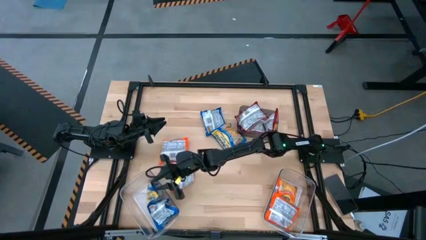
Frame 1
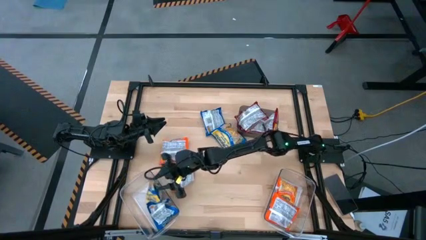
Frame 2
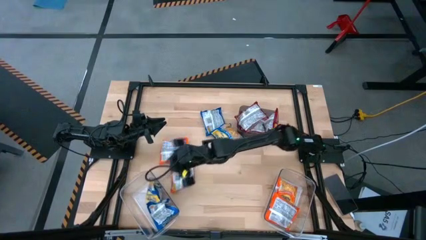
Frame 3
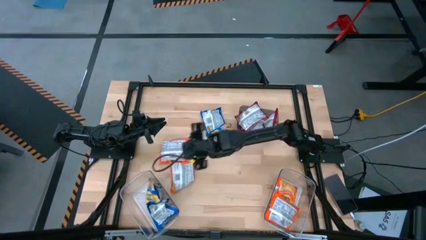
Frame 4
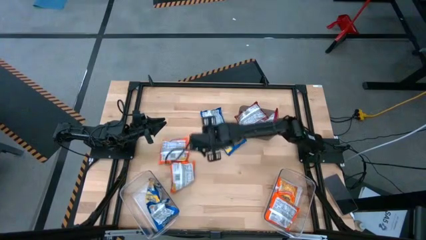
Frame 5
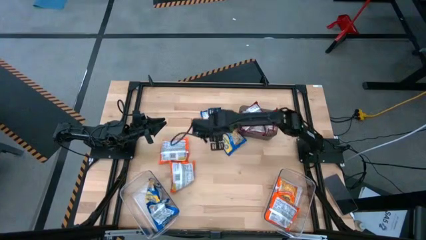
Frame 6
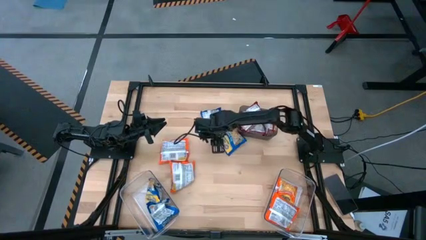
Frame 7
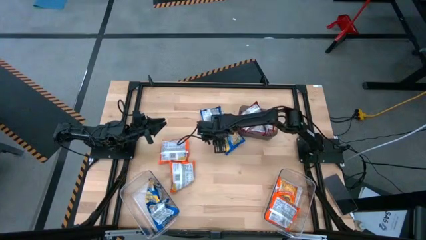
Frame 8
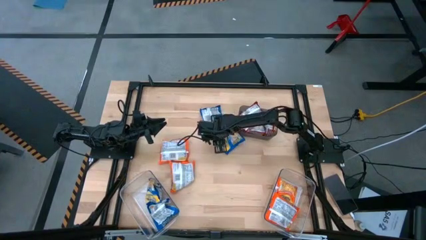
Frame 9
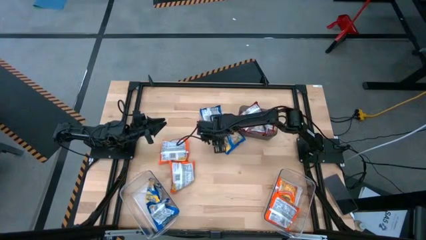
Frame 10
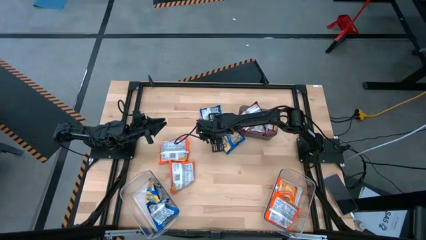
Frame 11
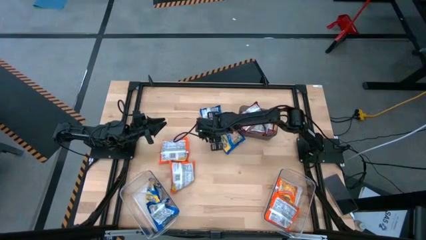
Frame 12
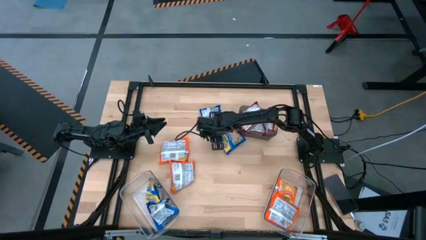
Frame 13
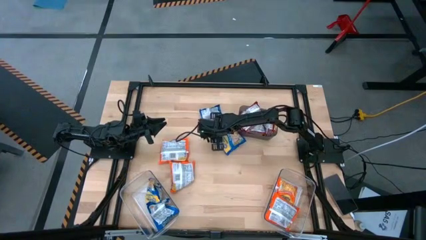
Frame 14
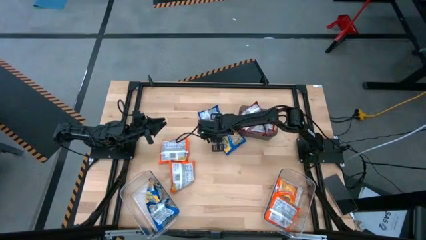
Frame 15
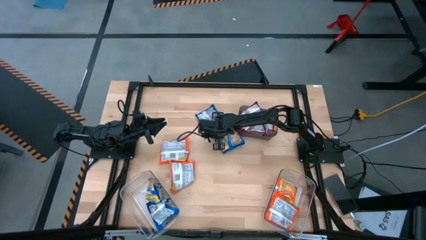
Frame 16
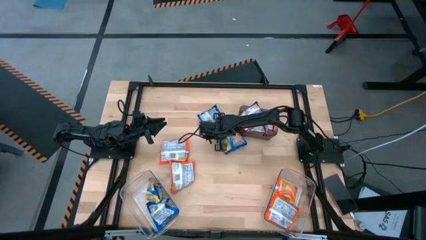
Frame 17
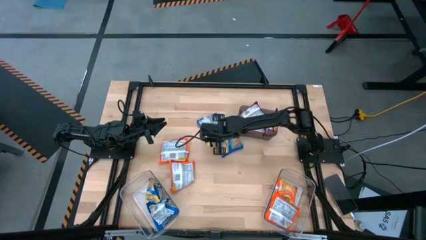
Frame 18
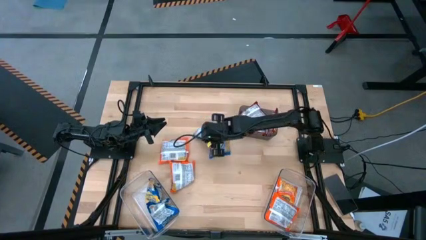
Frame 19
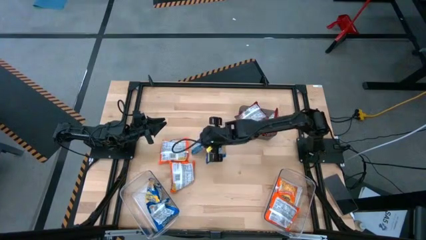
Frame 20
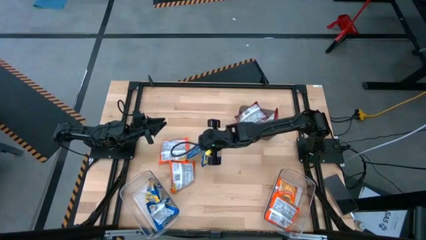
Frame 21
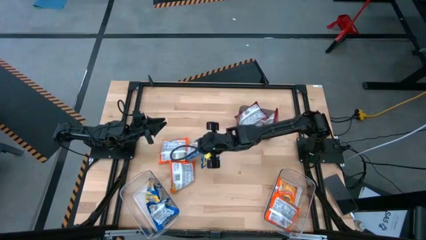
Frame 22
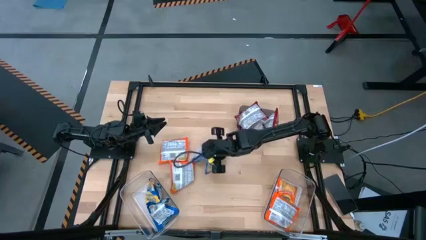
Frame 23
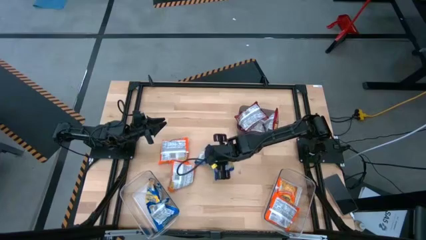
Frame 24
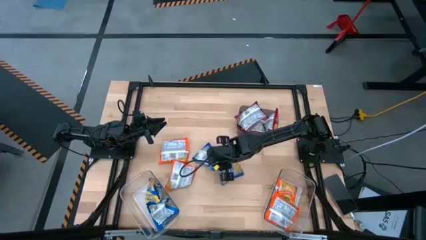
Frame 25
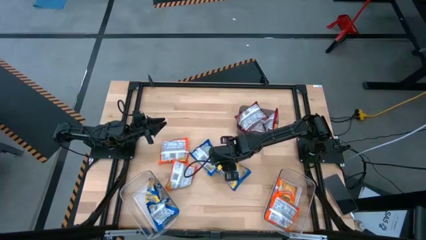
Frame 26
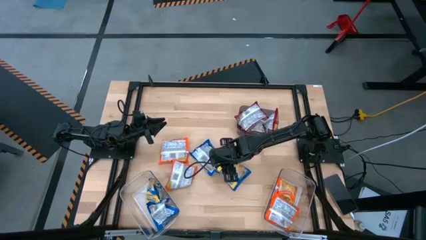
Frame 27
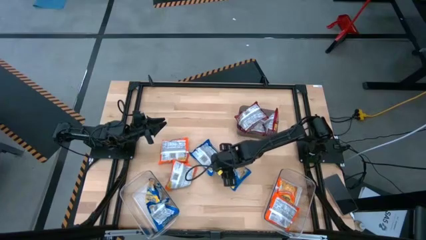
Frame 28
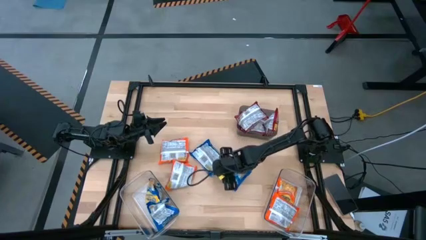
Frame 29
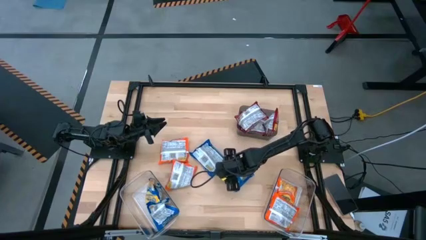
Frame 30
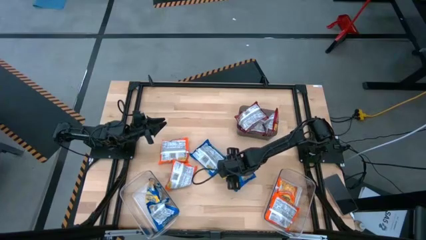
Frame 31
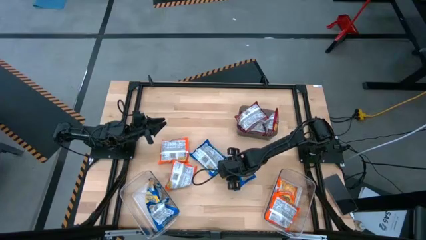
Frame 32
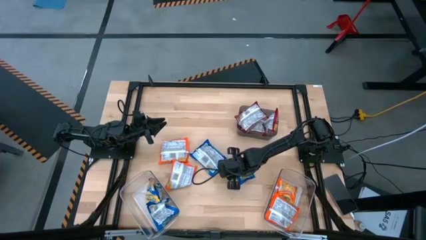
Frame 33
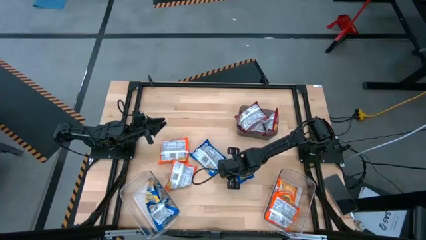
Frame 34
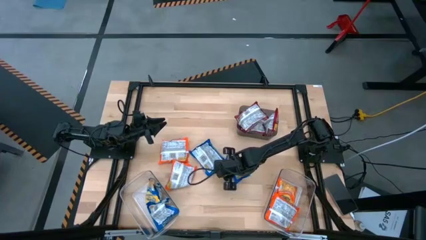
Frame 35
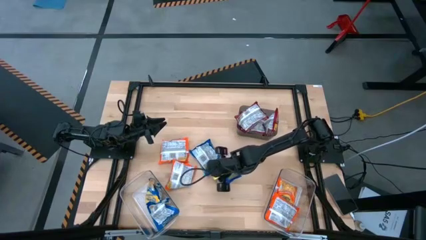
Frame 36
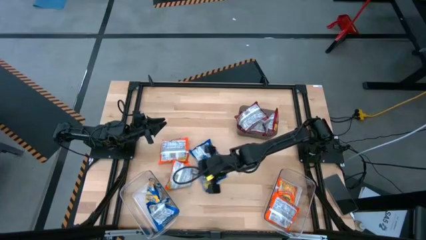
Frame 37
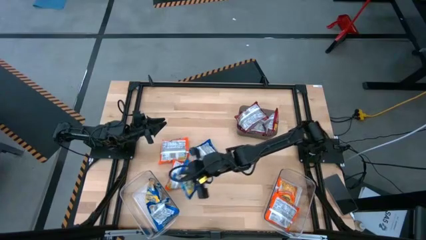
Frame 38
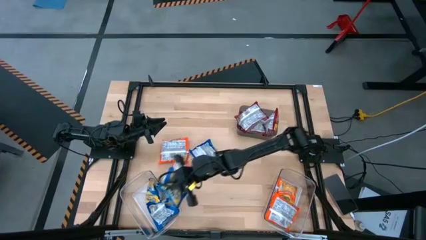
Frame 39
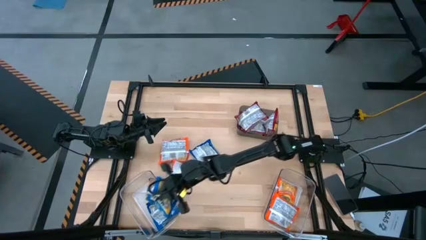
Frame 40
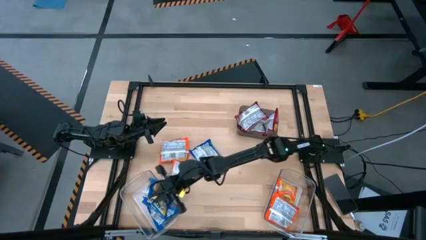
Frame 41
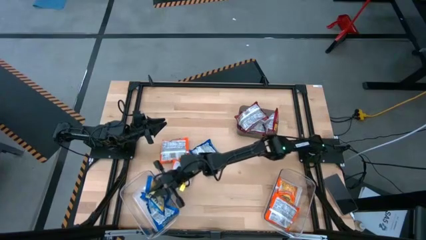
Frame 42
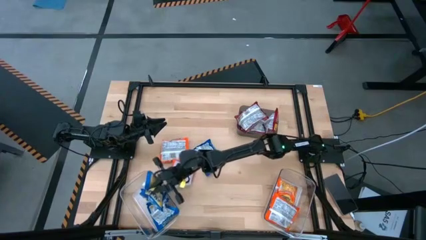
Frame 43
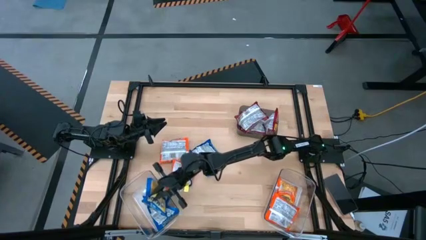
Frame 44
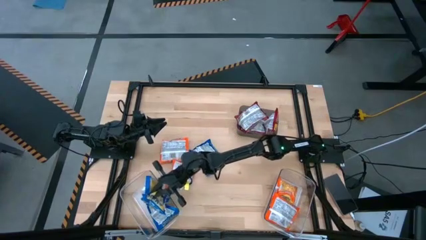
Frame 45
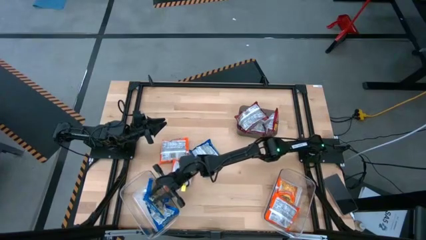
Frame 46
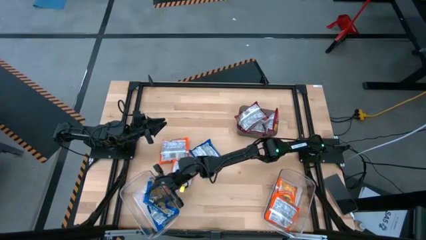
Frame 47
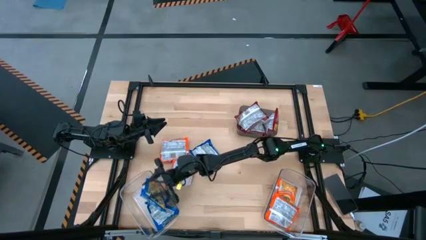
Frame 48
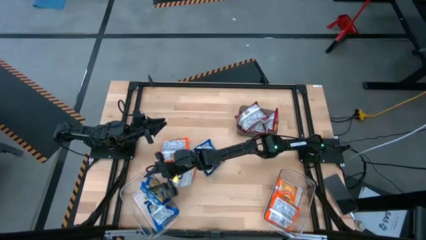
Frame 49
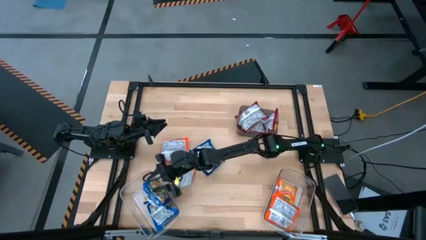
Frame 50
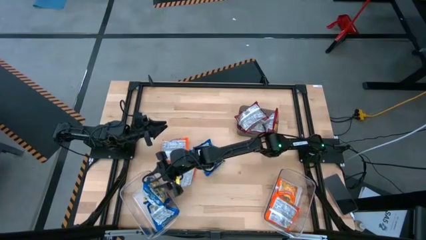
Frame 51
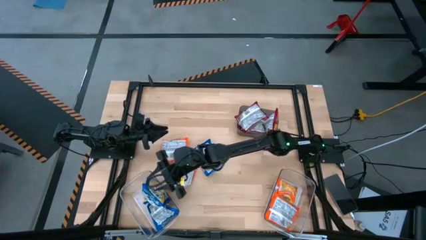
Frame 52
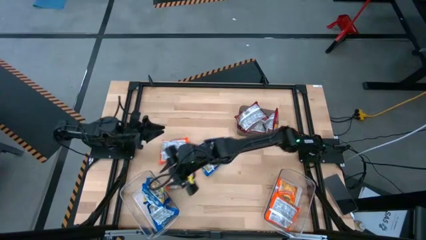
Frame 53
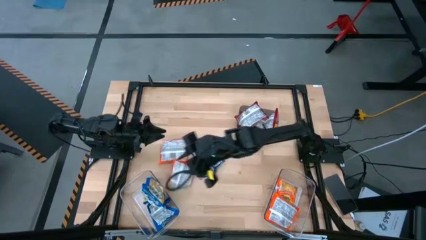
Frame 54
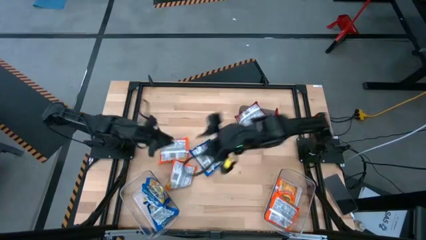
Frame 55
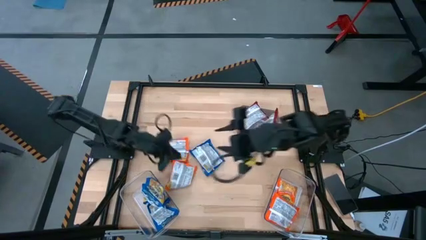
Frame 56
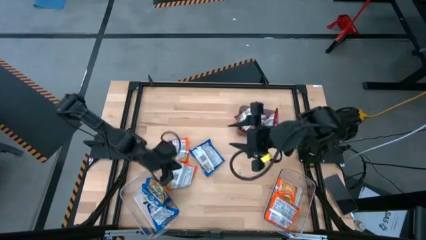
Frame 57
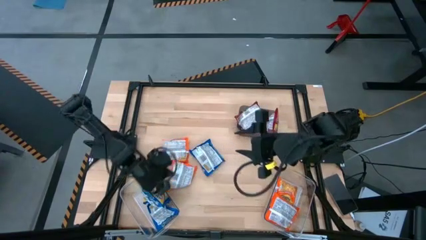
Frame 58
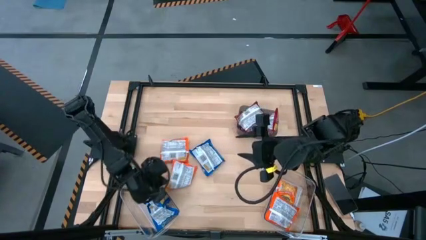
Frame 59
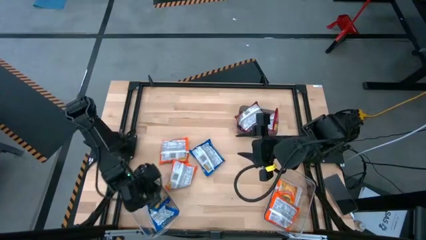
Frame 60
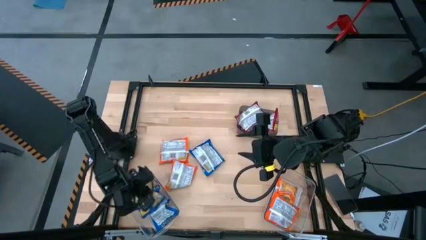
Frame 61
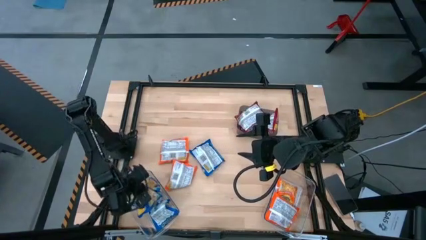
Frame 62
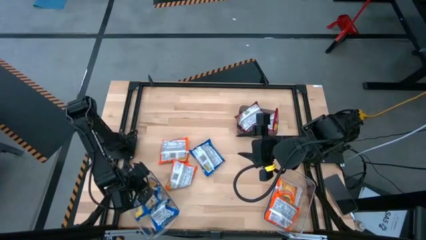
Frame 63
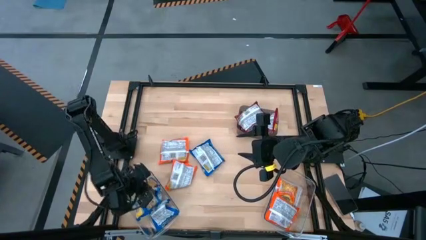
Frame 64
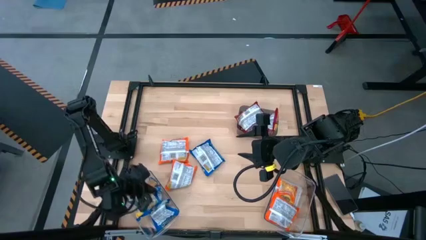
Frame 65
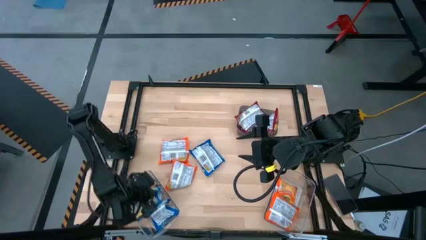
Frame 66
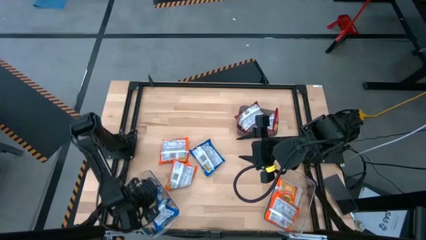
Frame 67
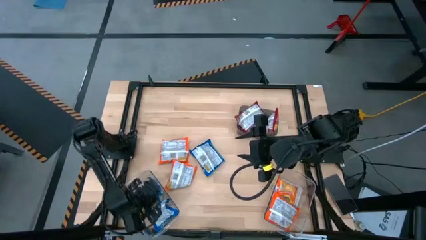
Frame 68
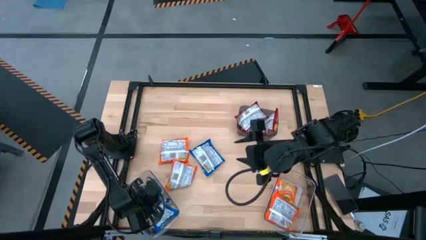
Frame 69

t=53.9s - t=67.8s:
Task: Sort Maruchan noodles
Put the blue noodle pack into the left transparent bin

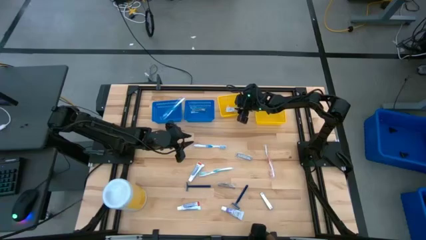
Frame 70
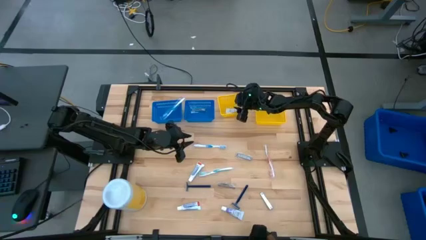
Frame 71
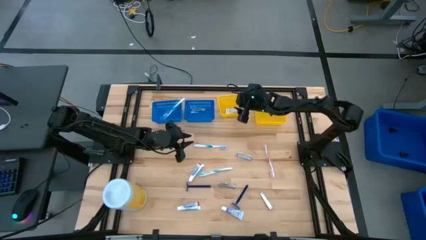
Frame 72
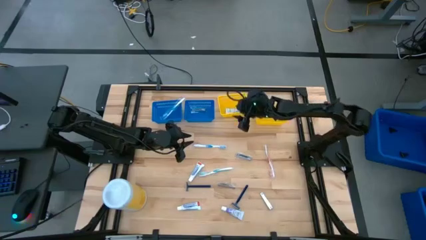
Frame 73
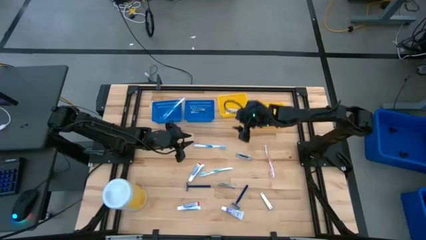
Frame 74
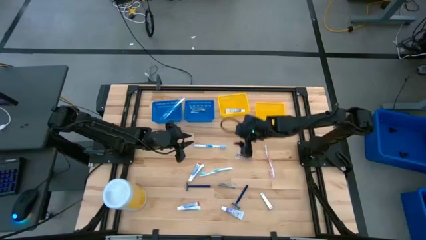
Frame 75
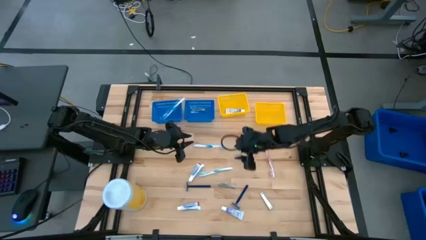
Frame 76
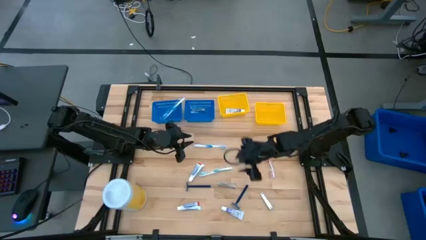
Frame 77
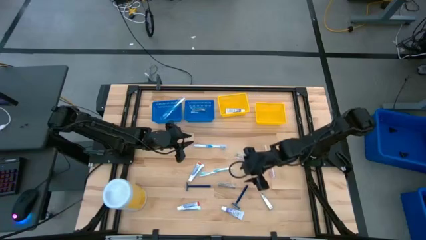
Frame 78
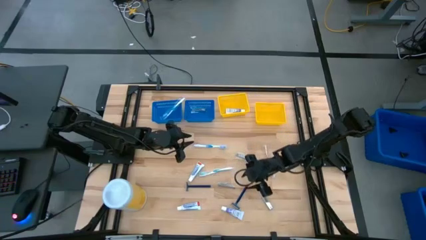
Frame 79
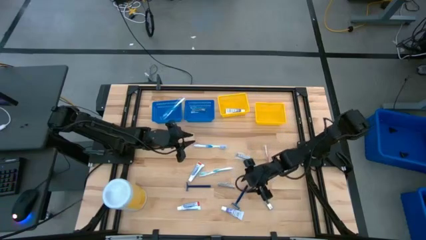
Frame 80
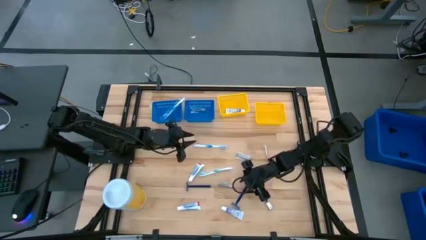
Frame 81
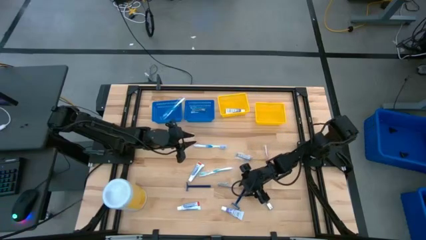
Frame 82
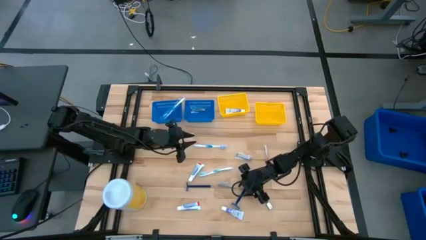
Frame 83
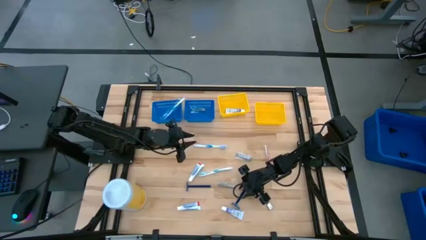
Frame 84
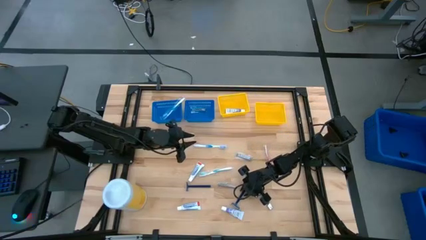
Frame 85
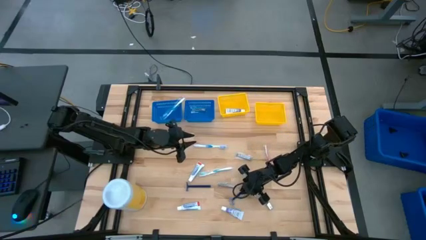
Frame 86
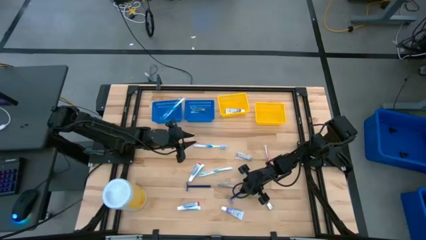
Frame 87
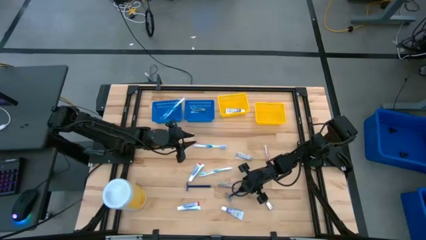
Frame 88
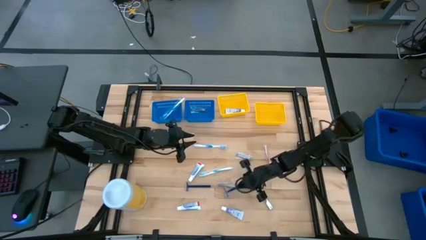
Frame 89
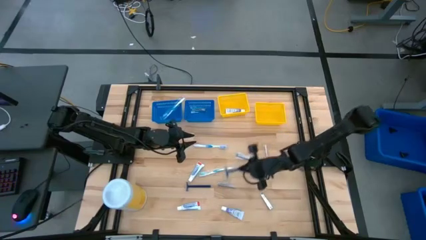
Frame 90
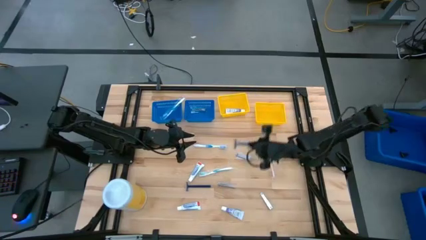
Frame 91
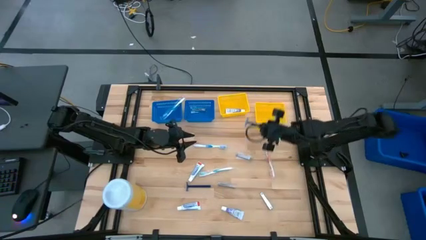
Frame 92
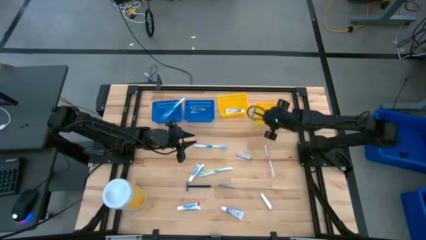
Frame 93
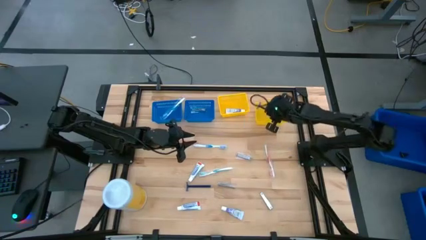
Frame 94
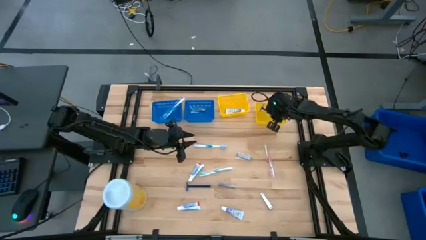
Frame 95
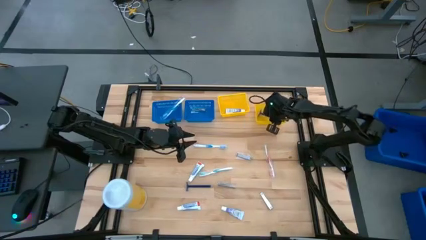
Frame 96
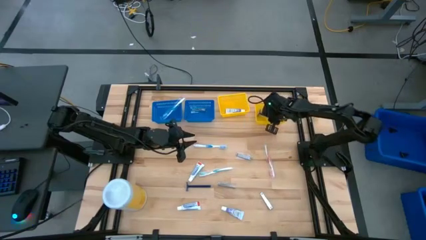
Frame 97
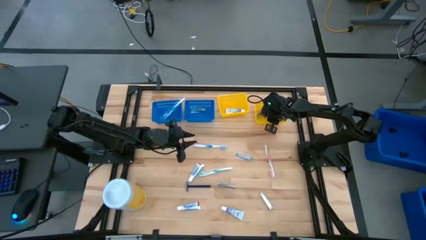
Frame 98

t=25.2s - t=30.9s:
Task: Pick & Place Travel size toiletries
Put the blue razor into the right yellow bin
